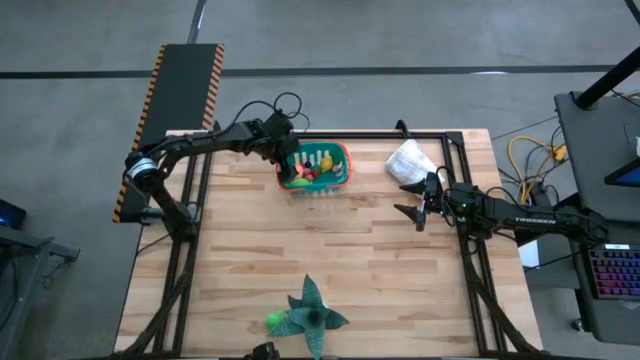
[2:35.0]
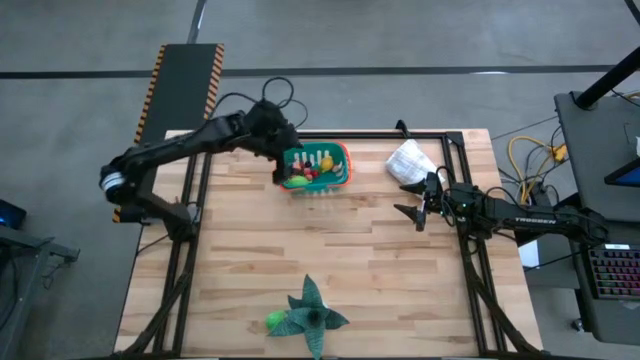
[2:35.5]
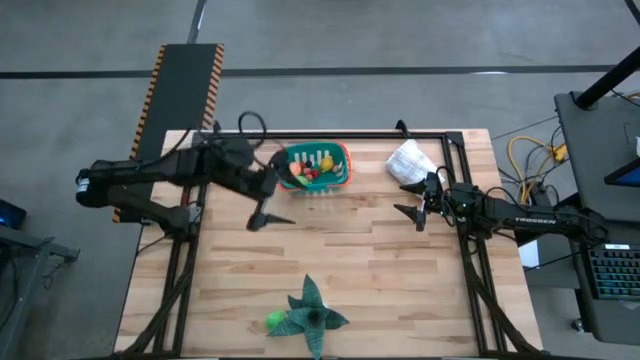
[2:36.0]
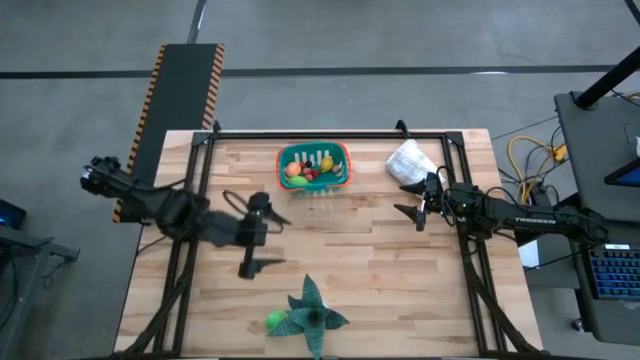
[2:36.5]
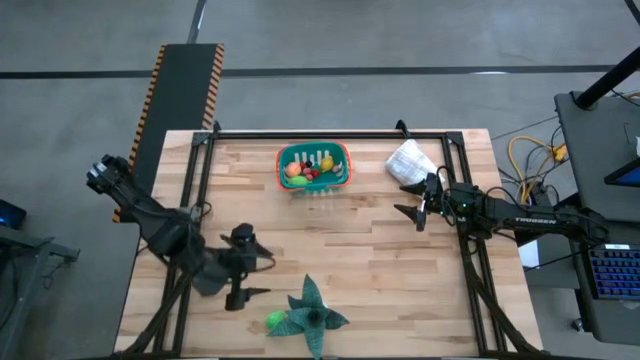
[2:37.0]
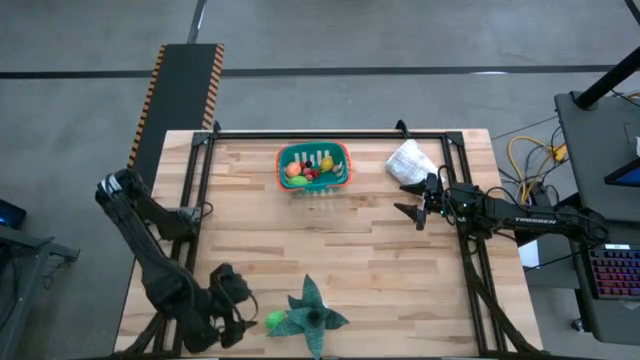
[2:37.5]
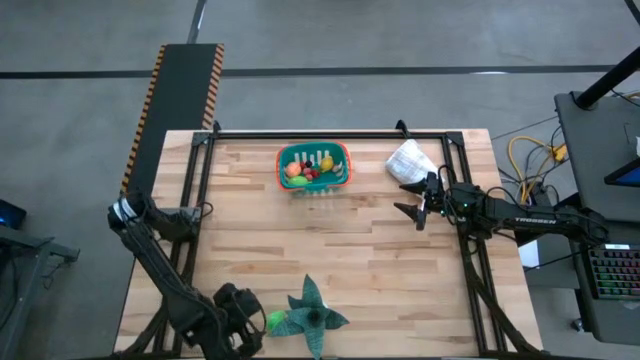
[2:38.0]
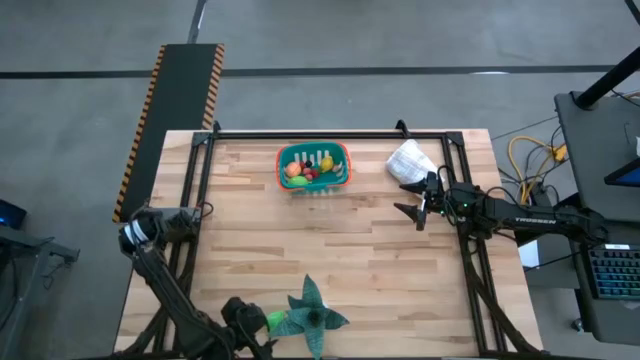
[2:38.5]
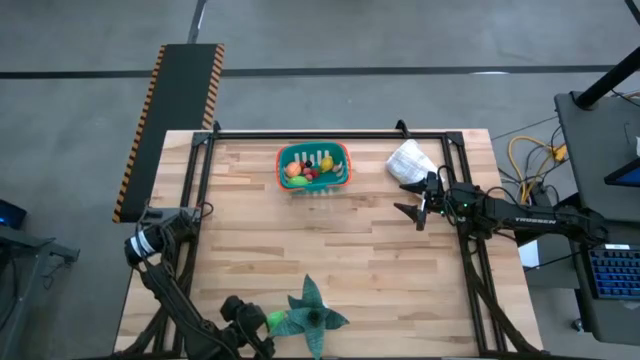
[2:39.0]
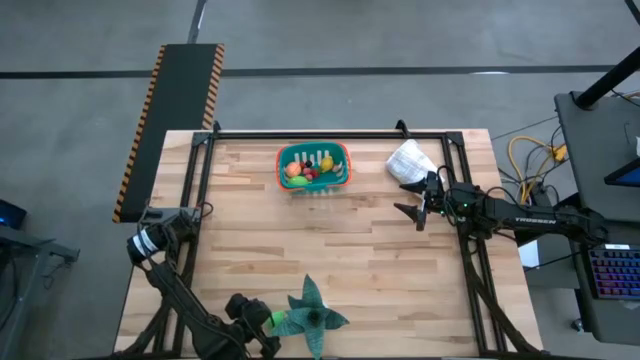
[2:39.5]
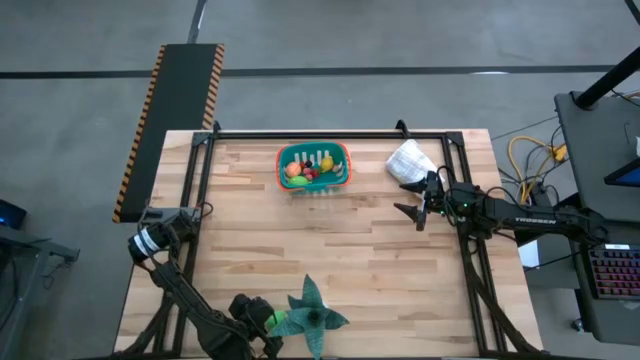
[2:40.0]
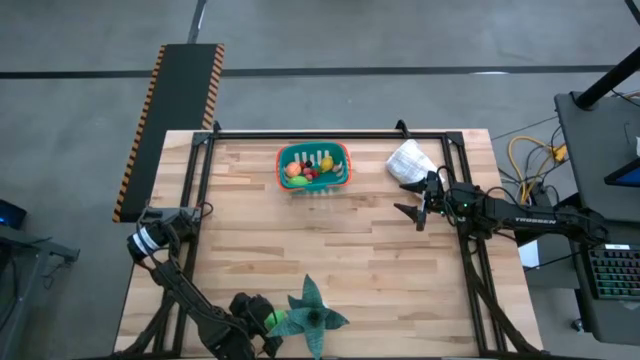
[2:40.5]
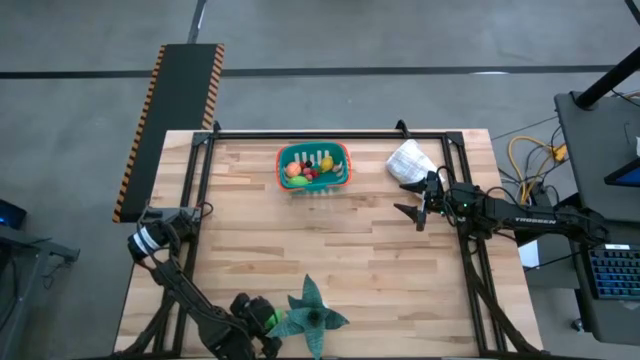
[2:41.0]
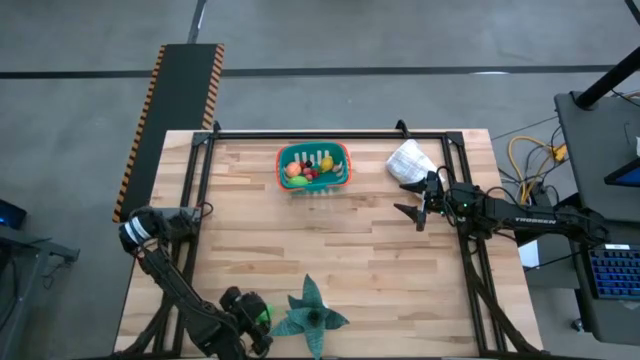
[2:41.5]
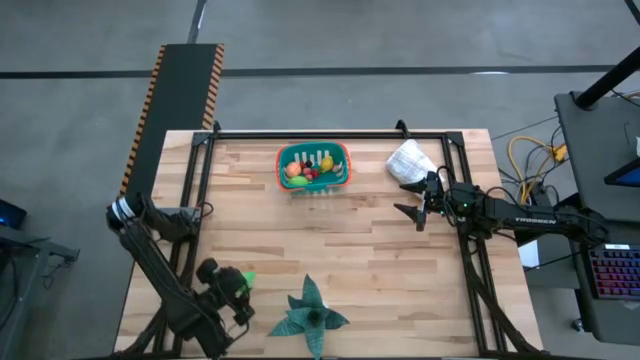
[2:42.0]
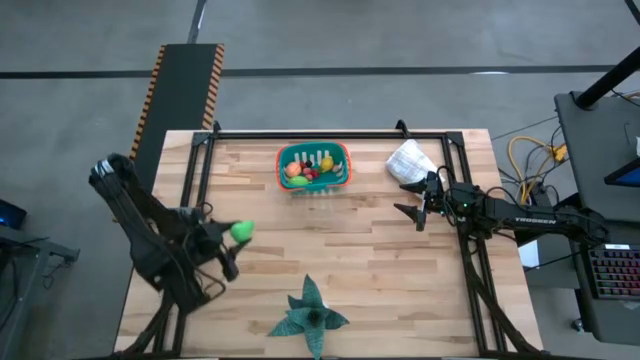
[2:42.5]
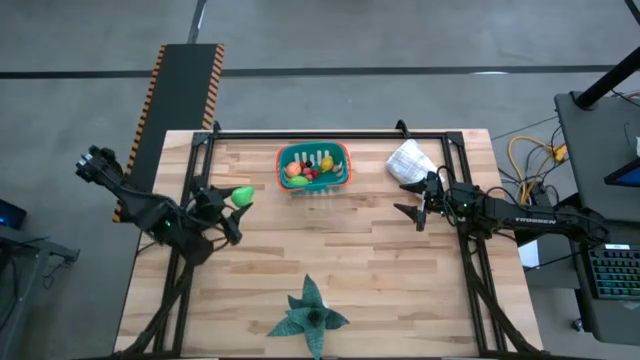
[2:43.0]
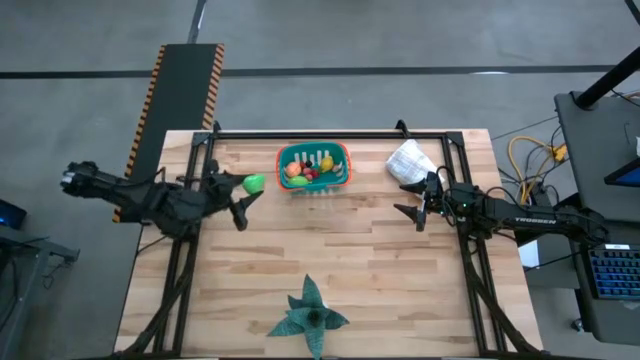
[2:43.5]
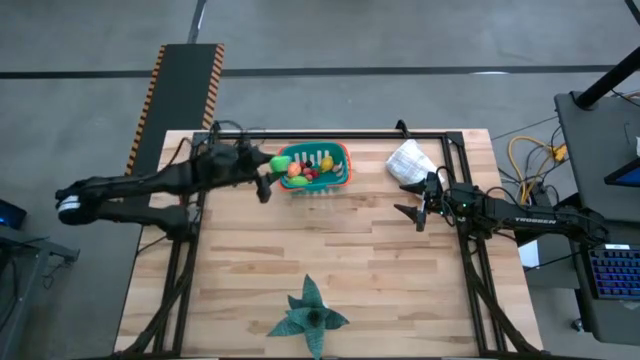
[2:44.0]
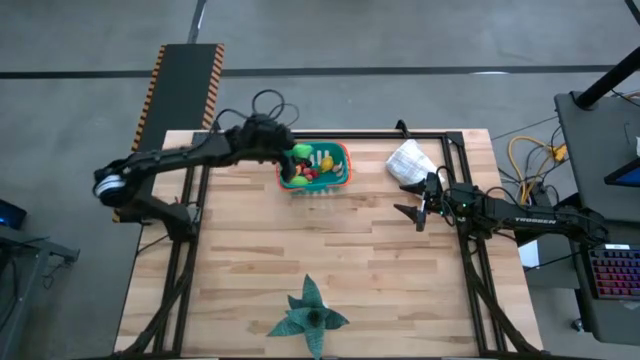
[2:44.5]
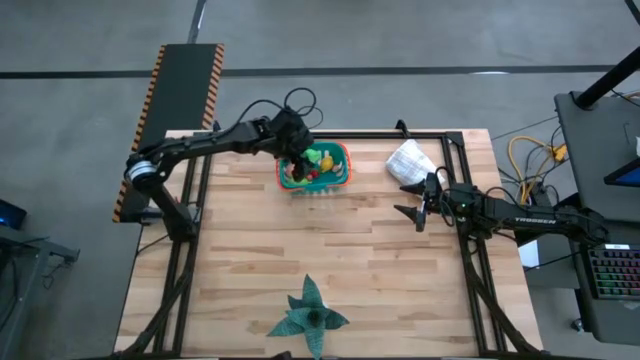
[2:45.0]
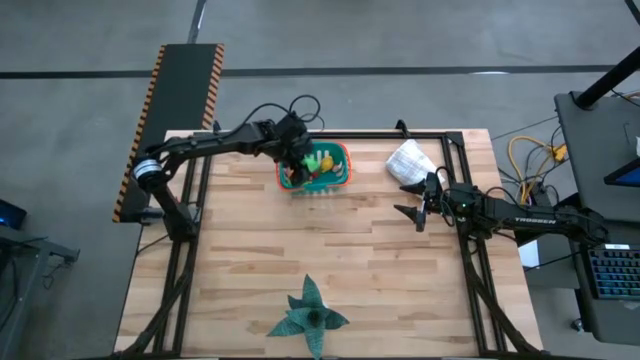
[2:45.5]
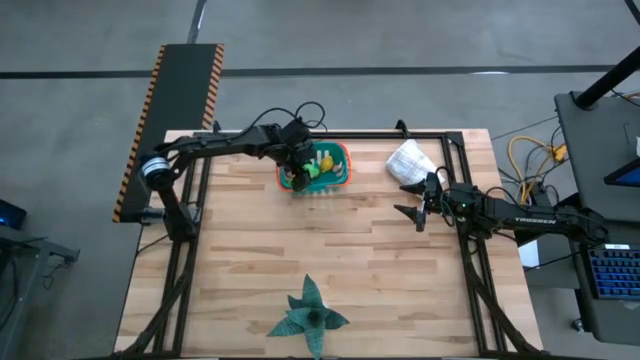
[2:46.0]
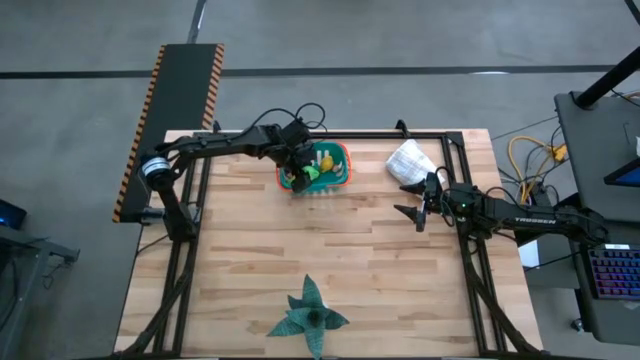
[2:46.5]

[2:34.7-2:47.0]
Task: Pick and placing Produce into tupperware
Put the green pear toy into the bin

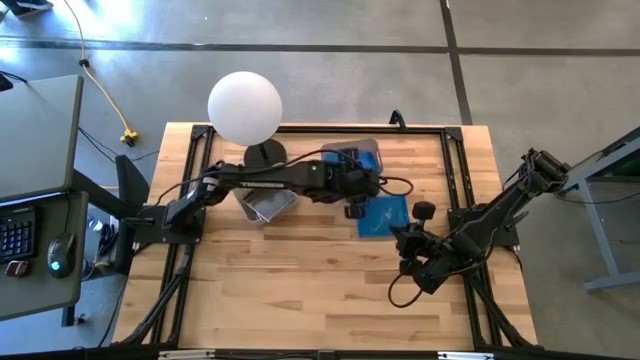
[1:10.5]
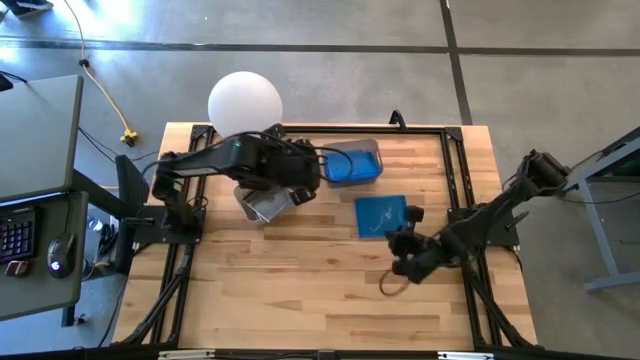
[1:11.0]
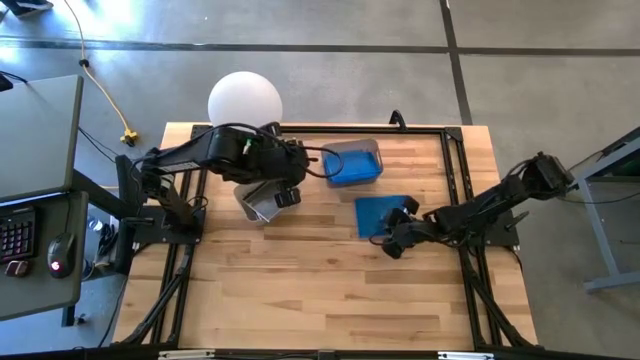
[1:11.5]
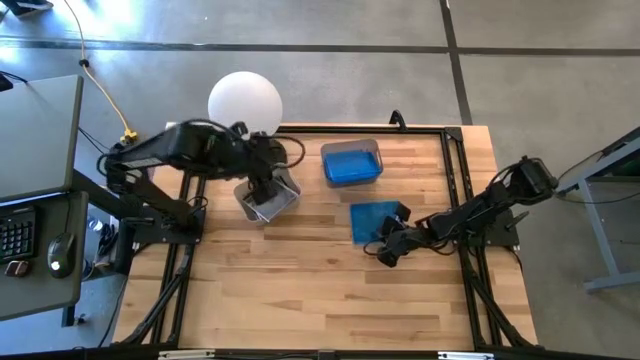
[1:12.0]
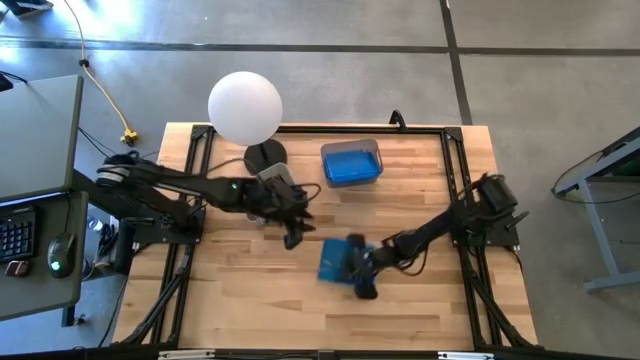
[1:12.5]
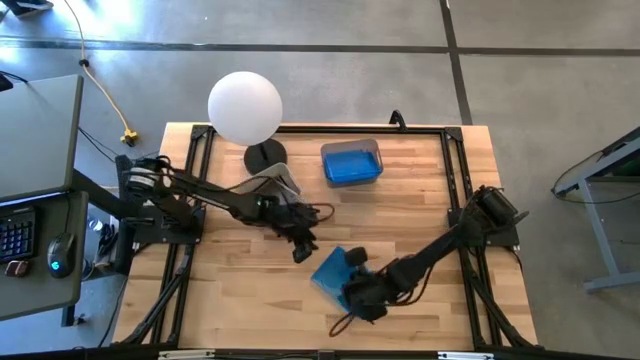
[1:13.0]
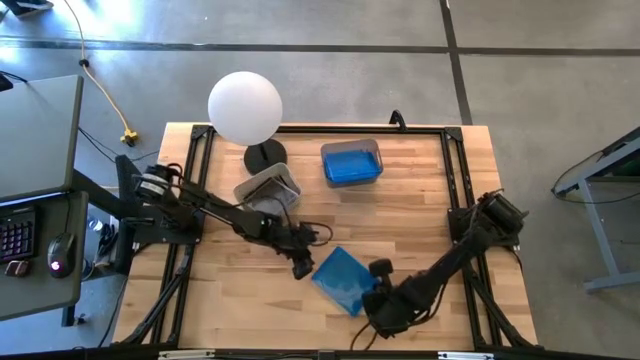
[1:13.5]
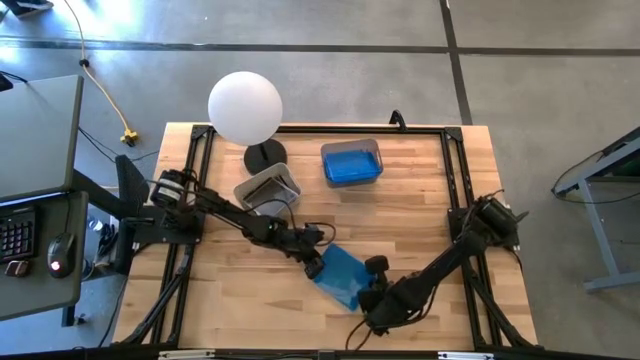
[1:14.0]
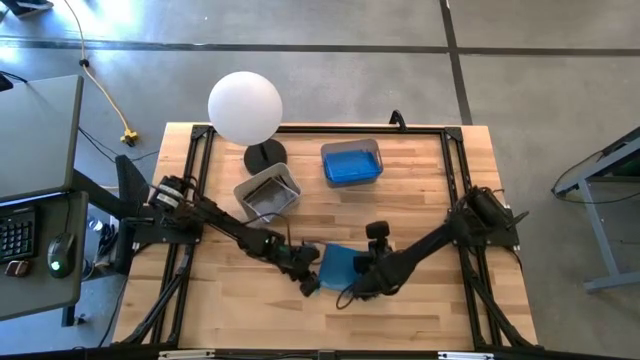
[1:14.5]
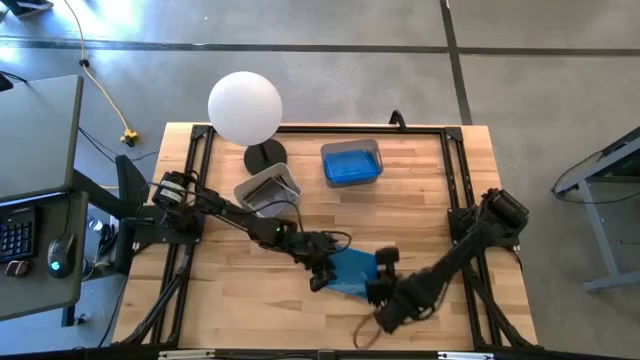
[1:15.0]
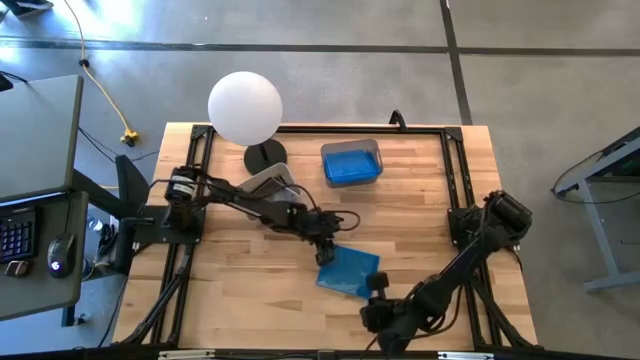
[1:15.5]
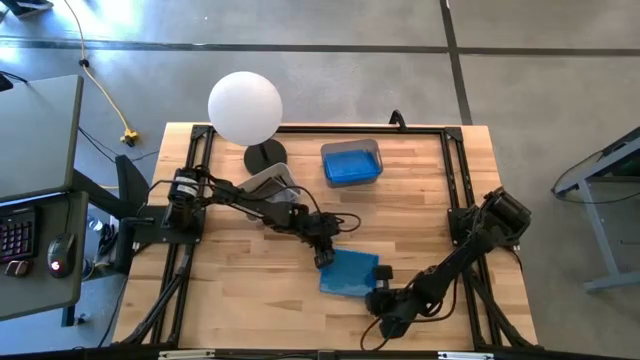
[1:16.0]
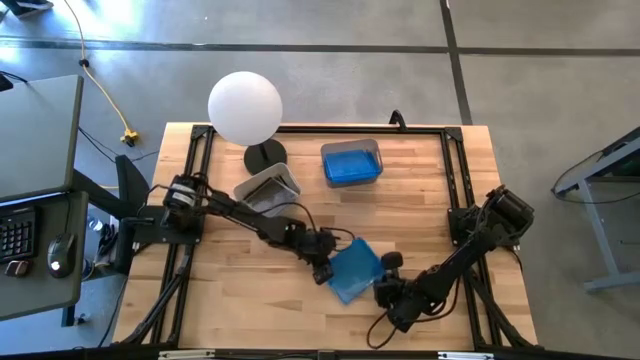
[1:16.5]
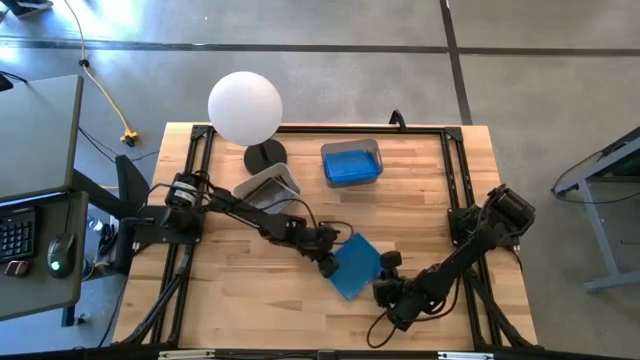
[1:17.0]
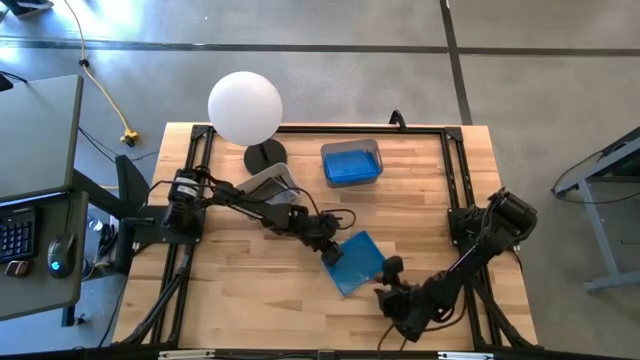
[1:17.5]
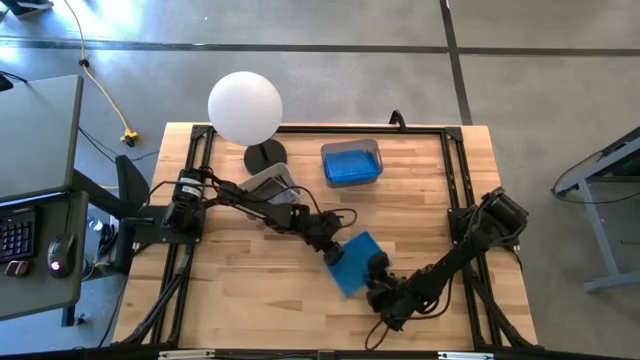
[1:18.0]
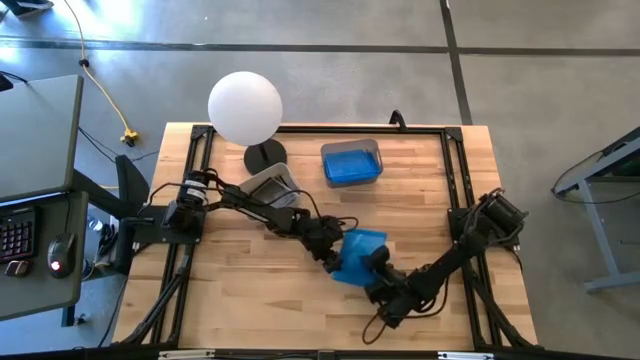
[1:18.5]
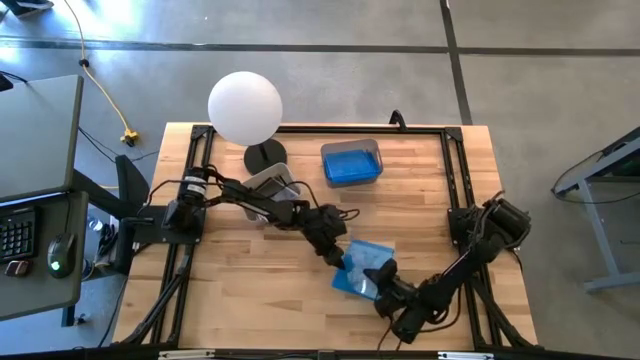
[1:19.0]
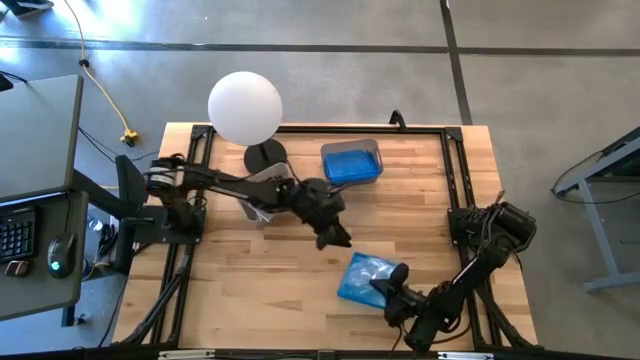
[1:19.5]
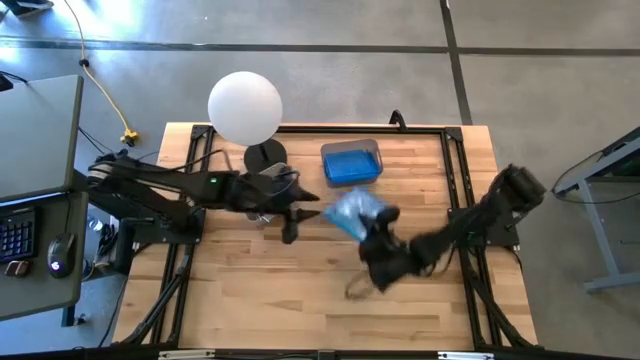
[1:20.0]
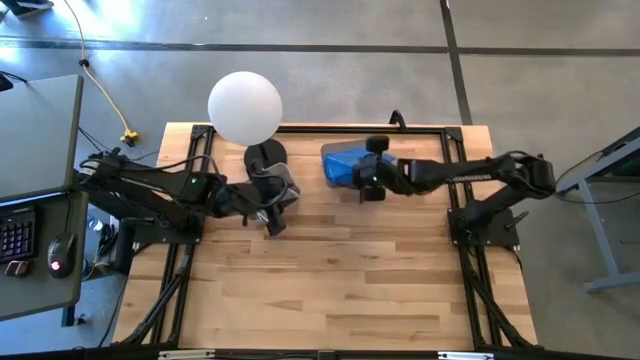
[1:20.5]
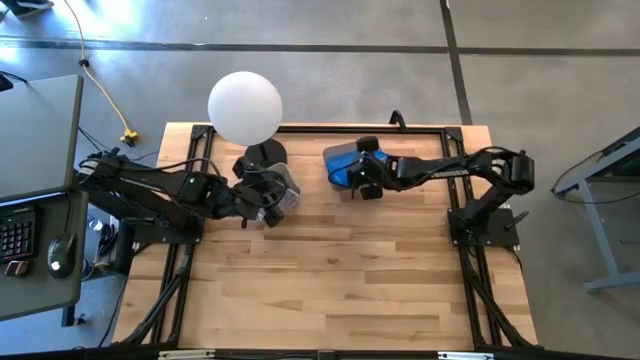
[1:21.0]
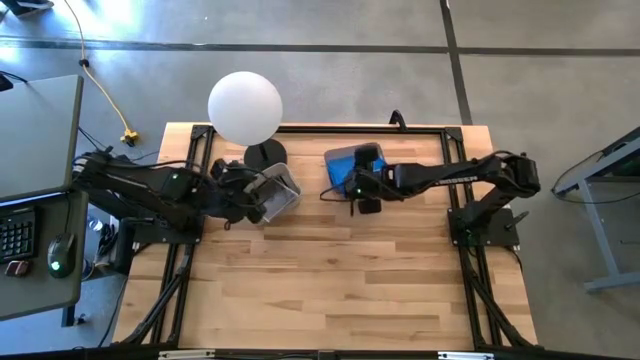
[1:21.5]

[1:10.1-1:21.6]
Task: Pick & place jewel cases by type
Put the blue CD case into the black bin
